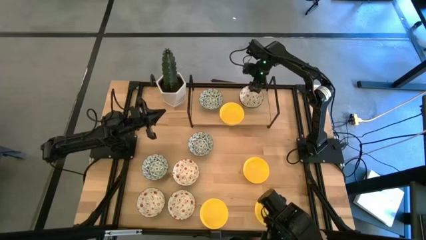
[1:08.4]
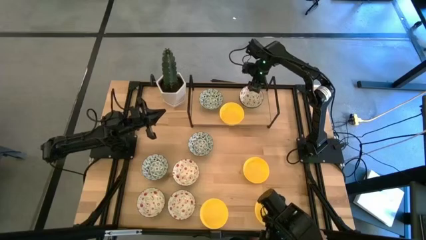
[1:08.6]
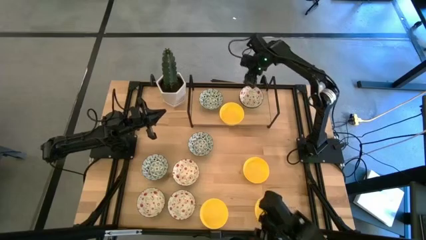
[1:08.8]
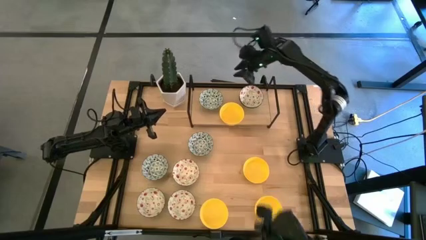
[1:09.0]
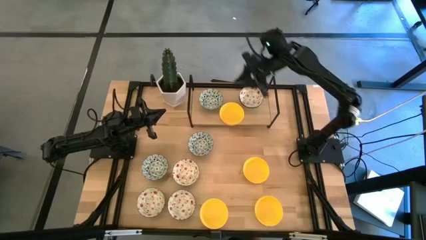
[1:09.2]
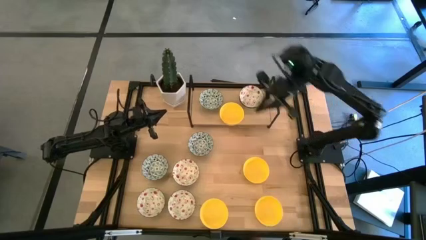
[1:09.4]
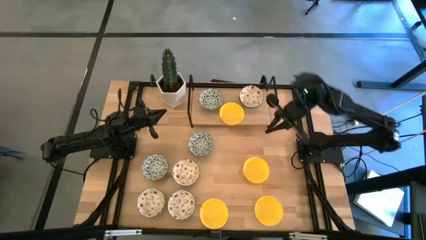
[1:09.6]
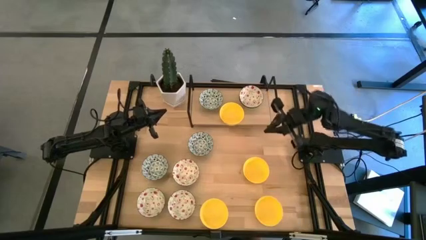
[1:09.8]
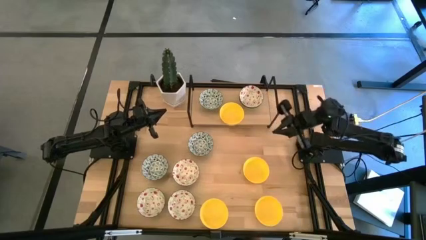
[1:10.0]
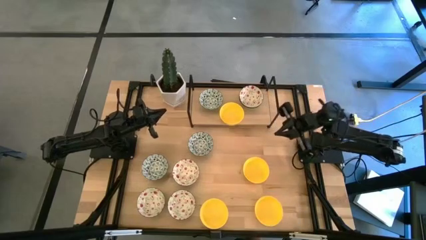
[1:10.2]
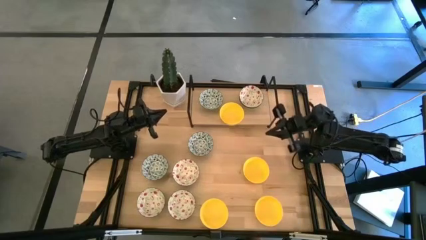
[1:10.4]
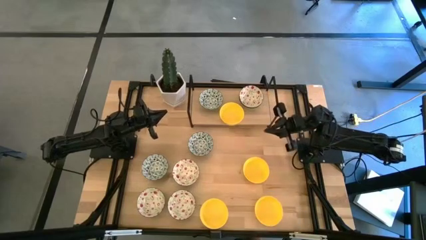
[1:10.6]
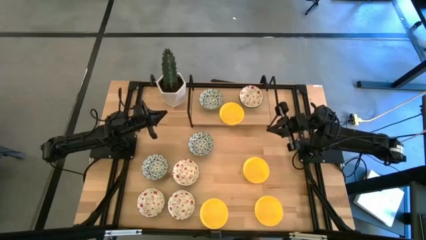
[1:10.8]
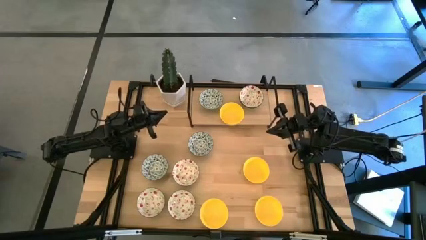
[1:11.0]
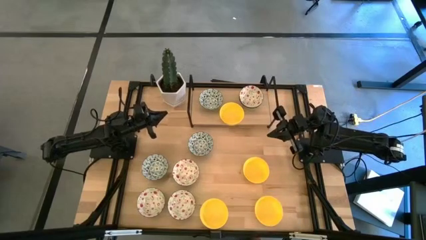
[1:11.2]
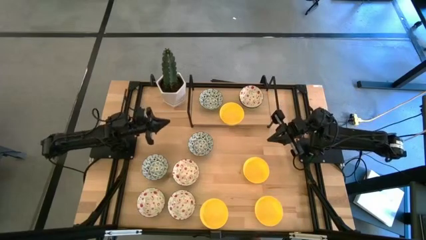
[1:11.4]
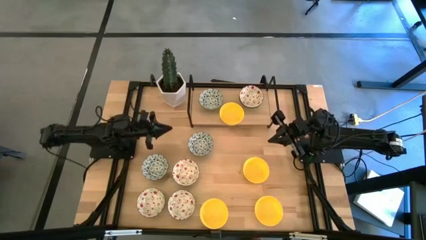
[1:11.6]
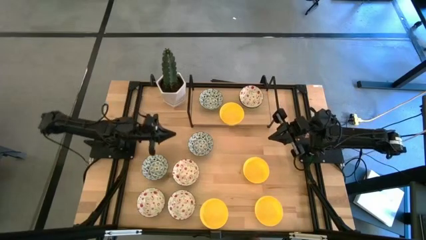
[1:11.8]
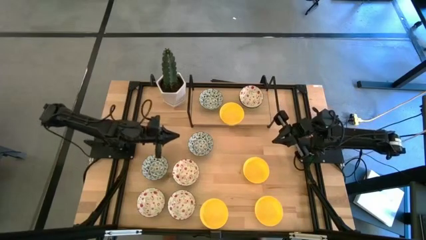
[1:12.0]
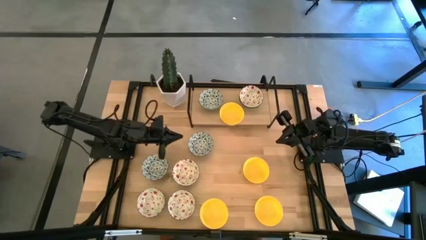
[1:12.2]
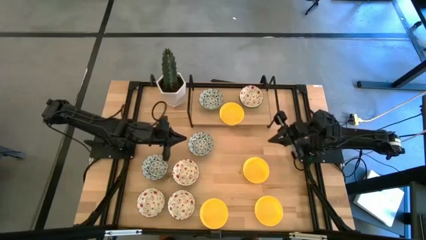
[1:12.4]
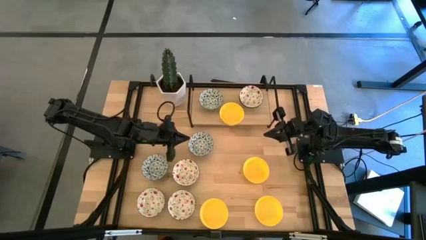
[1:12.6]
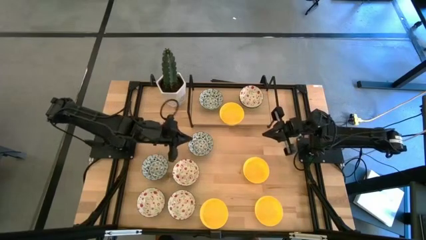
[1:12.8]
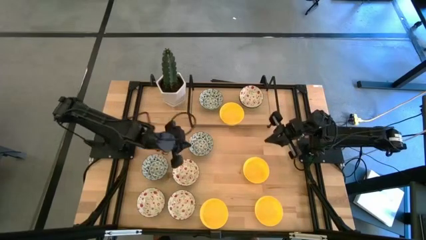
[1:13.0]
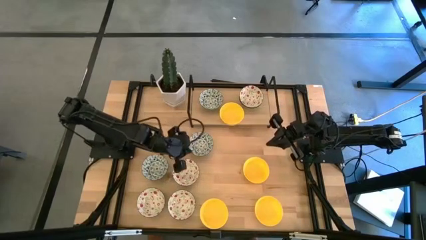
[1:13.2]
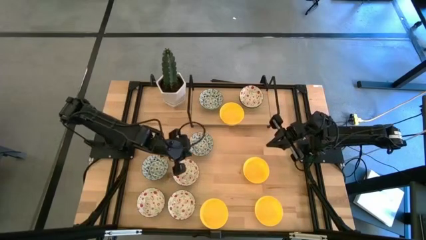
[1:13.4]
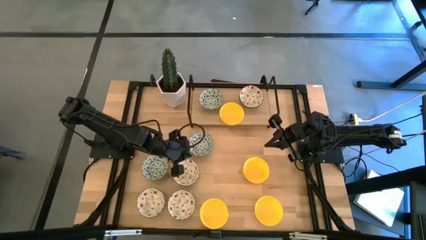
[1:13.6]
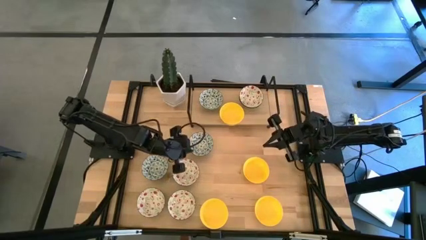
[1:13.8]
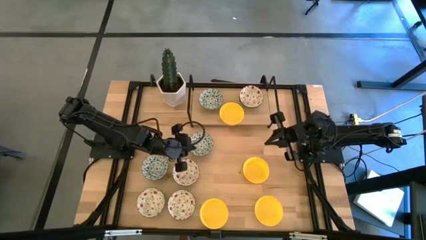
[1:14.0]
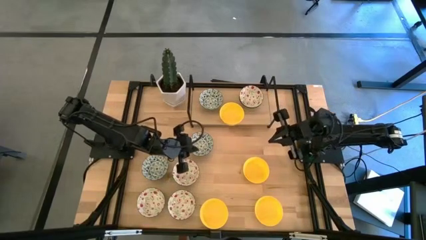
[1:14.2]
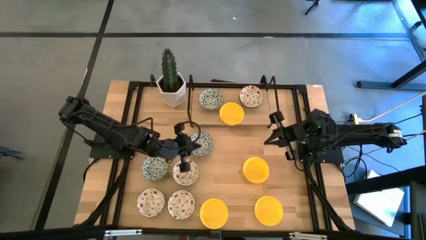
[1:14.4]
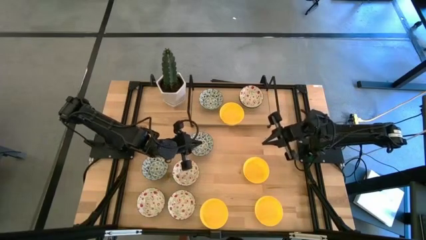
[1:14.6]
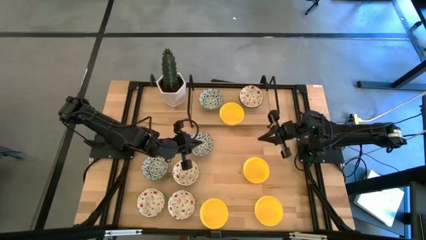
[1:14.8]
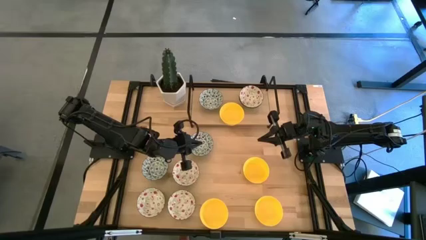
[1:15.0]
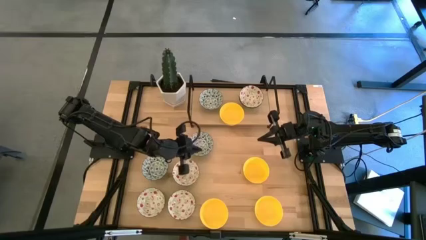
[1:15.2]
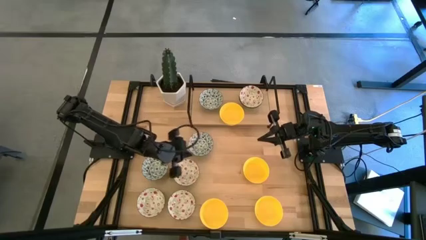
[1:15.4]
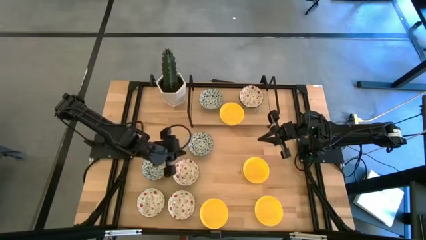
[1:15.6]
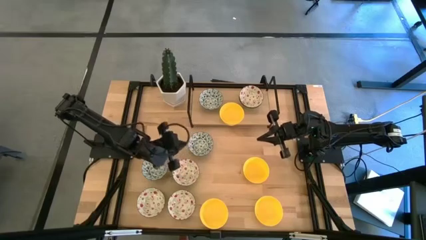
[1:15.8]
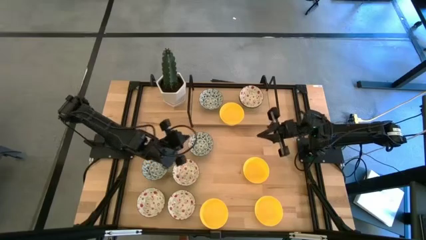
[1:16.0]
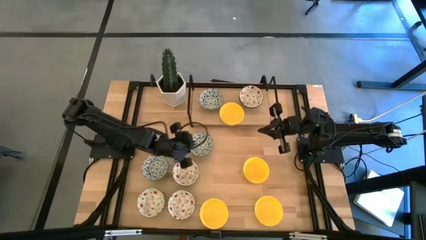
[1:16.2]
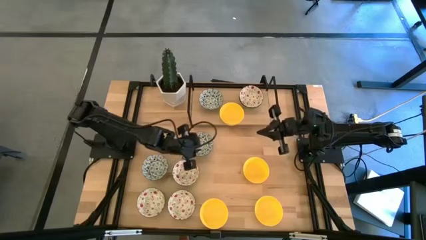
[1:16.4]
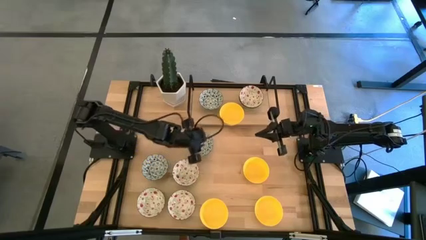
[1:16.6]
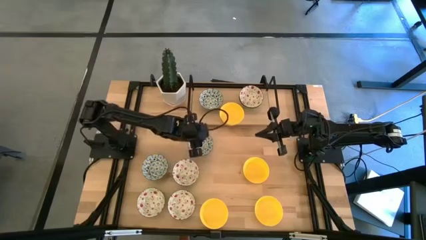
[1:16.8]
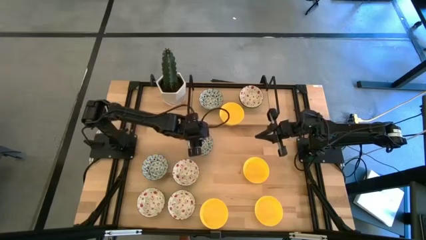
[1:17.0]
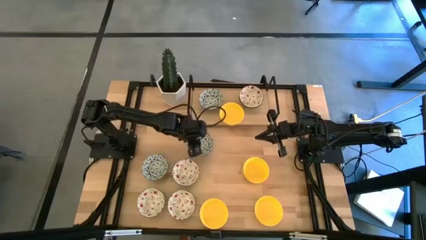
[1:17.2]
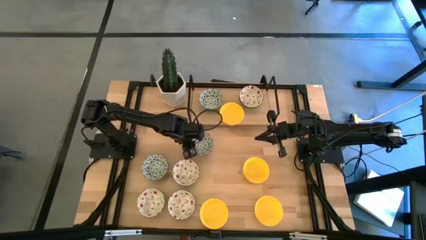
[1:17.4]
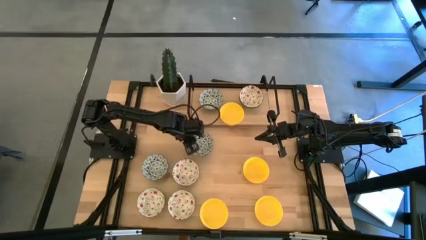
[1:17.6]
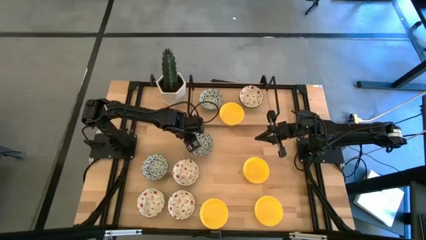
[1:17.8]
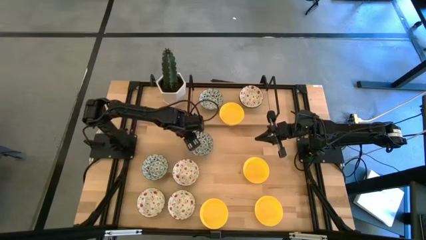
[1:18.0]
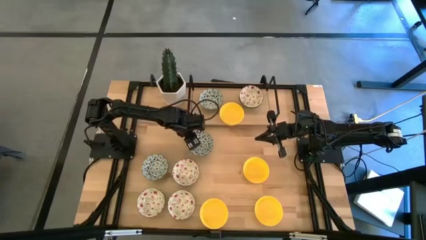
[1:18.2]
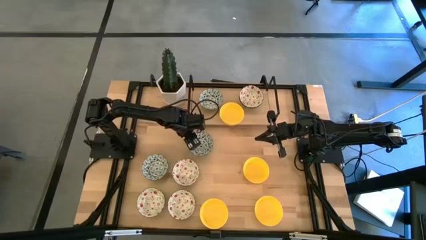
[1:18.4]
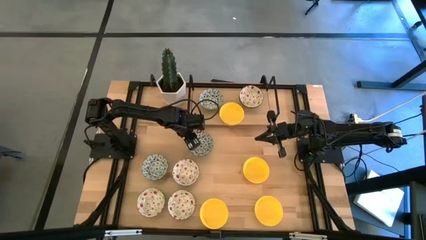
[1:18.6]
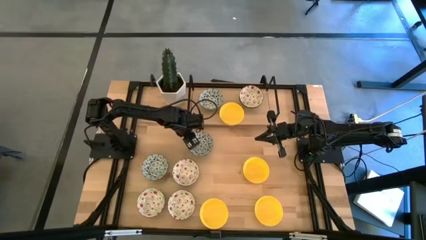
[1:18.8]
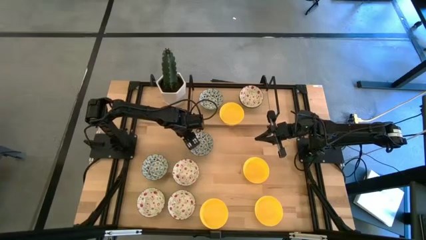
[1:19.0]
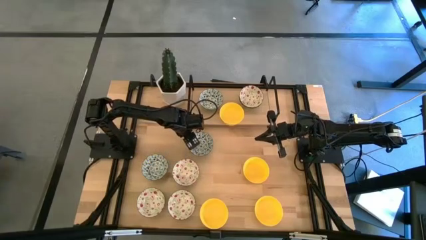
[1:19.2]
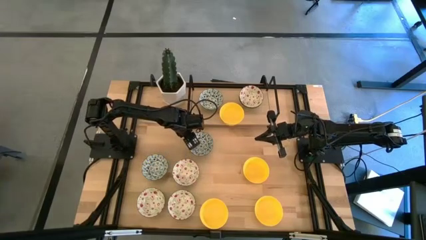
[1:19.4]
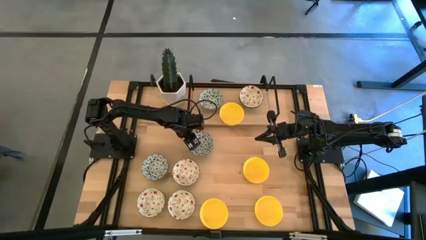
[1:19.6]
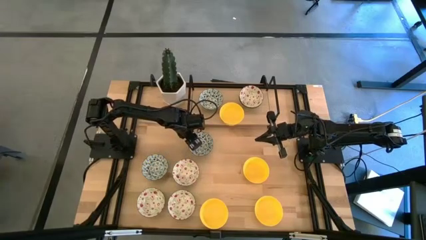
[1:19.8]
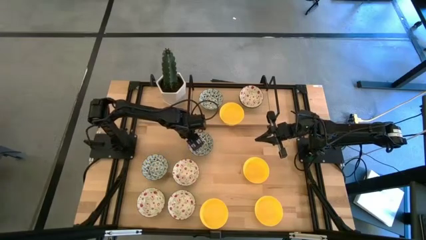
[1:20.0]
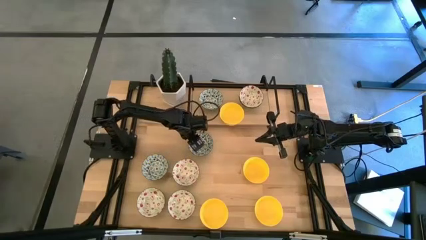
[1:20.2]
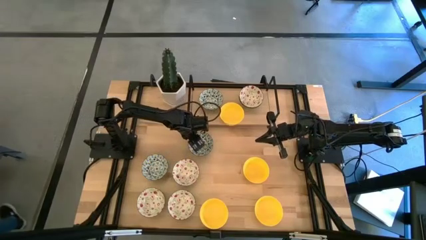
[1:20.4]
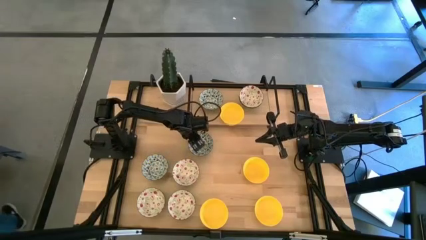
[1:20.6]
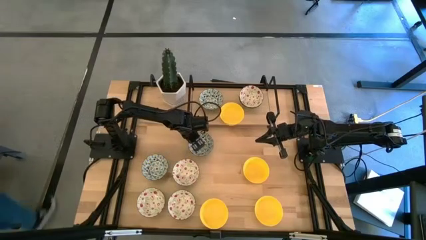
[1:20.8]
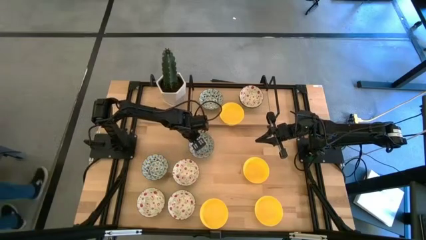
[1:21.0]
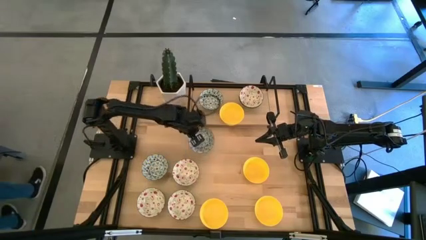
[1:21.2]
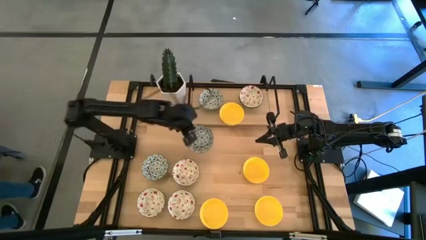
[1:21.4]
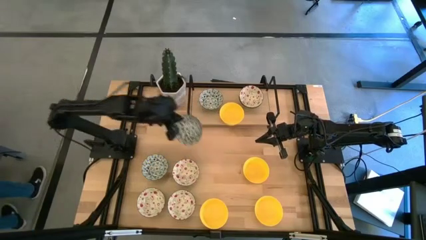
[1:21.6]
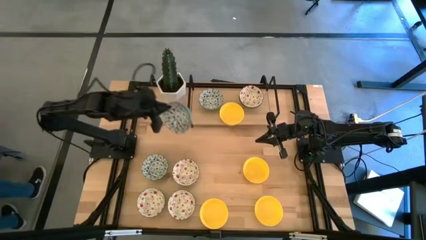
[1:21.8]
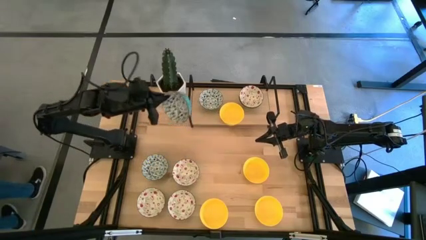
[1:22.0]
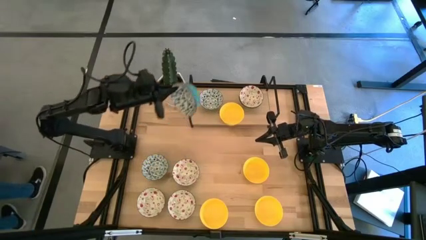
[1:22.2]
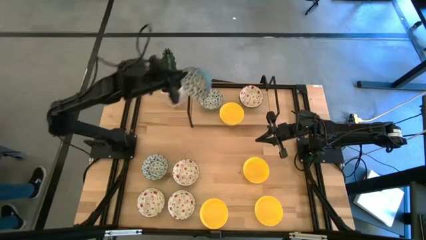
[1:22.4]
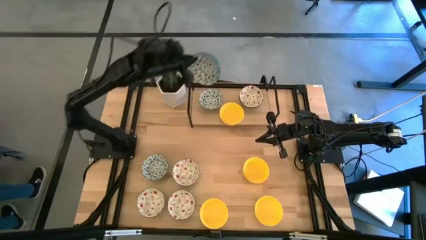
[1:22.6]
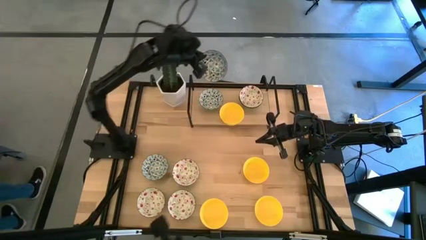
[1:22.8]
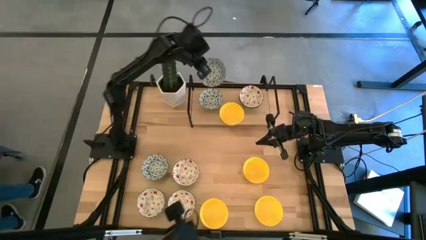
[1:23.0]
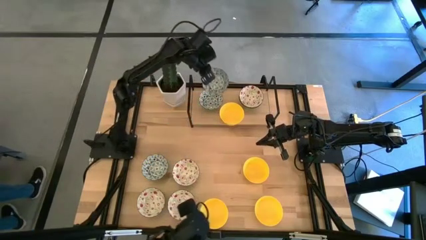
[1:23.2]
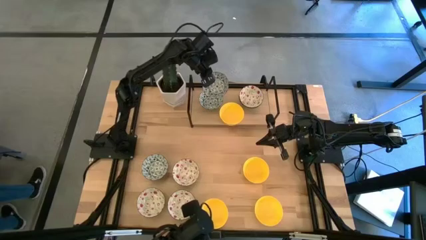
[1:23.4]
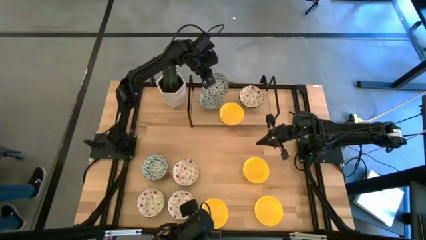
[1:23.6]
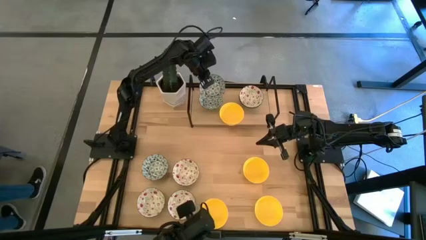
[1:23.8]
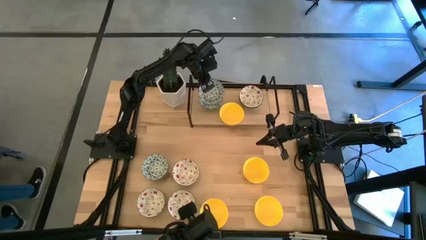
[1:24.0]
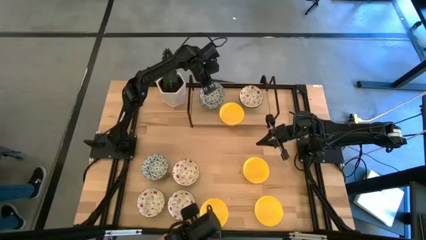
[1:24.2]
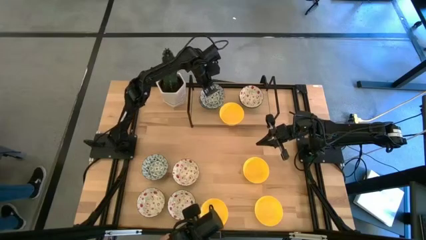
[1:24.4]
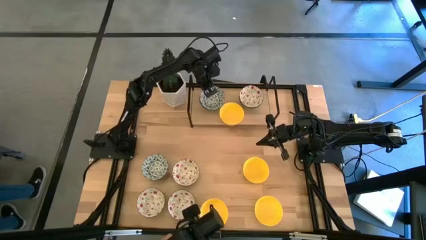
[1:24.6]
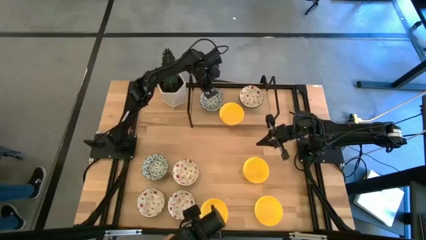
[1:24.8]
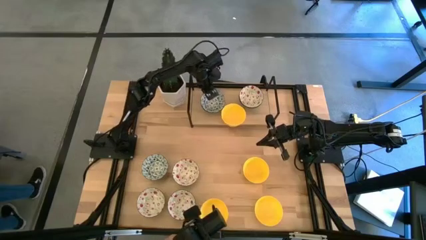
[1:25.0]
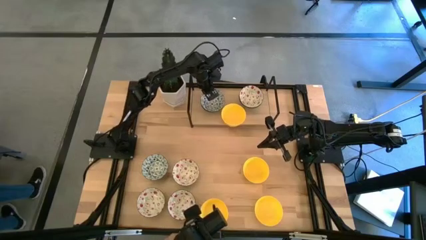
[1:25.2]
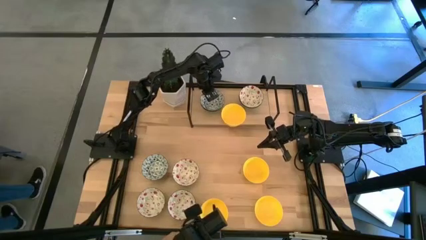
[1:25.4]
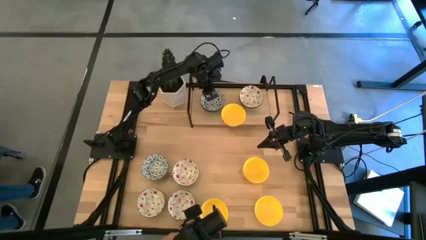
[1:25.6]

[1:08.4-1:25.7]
Task: Pick & Place Mini bowls
Stack the blue printed bowl on top of the blue printed bowl on the shelf
